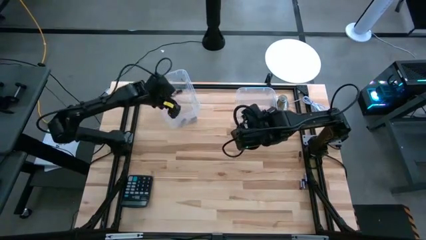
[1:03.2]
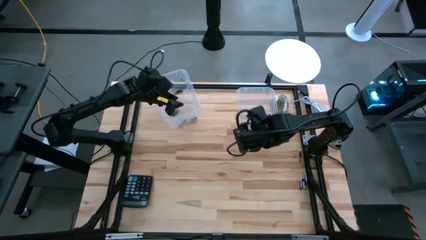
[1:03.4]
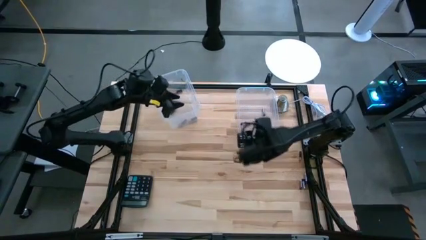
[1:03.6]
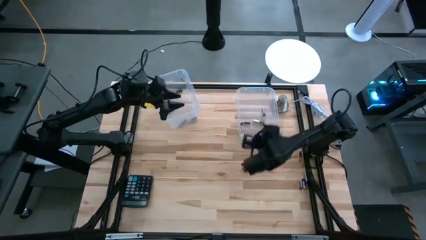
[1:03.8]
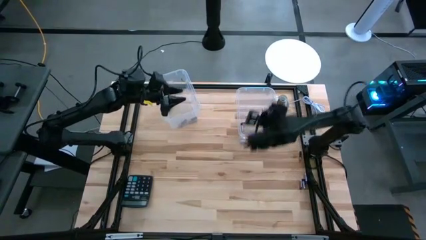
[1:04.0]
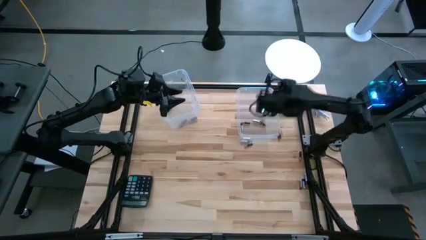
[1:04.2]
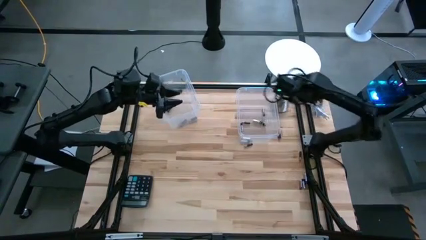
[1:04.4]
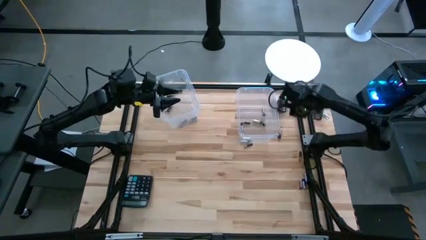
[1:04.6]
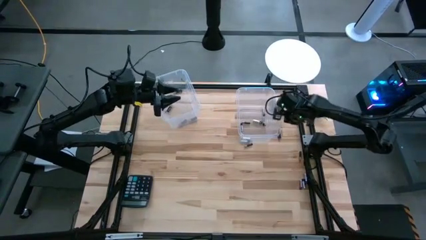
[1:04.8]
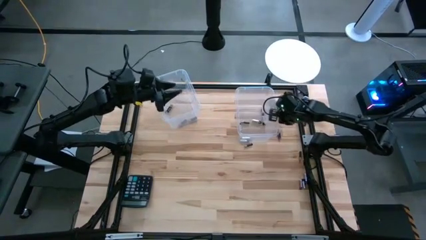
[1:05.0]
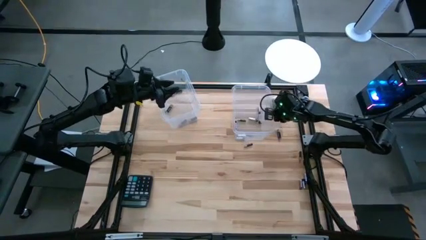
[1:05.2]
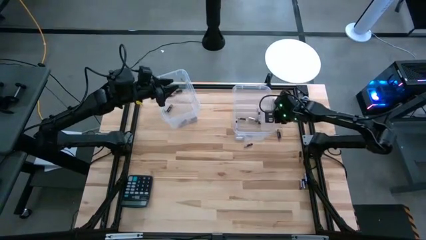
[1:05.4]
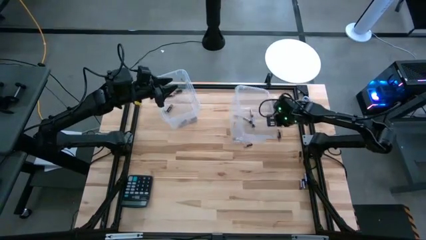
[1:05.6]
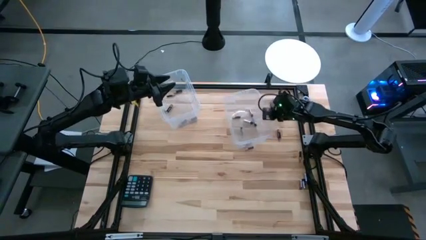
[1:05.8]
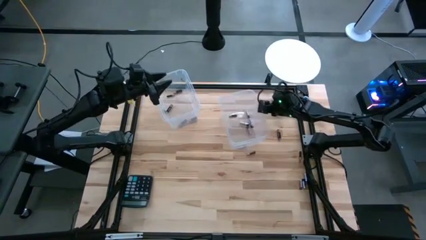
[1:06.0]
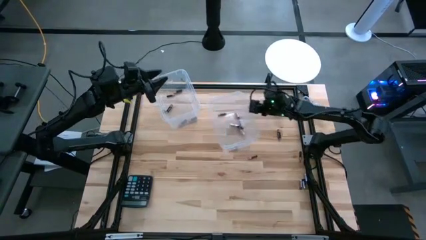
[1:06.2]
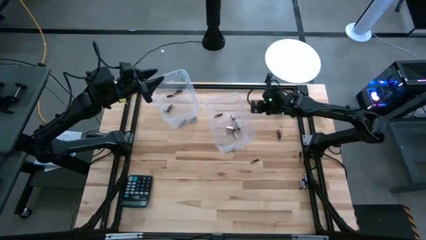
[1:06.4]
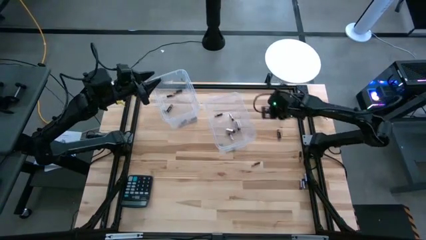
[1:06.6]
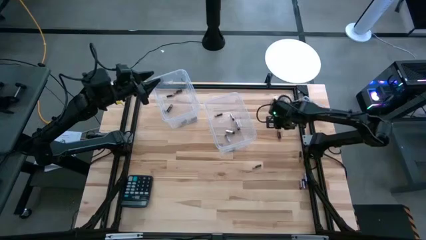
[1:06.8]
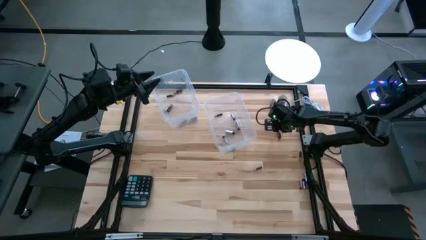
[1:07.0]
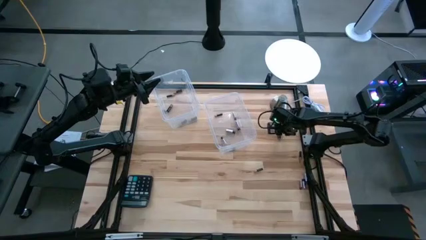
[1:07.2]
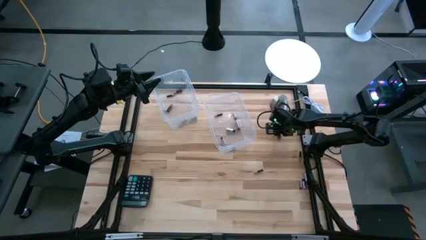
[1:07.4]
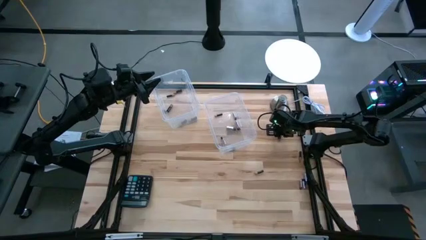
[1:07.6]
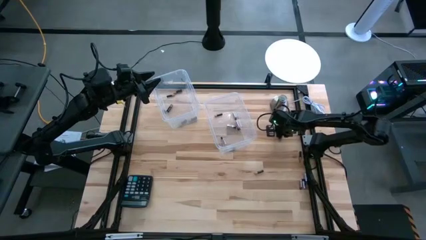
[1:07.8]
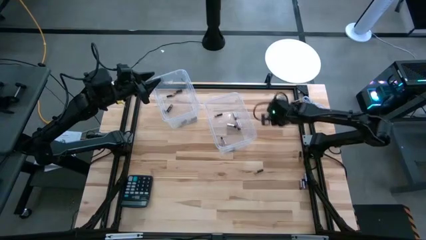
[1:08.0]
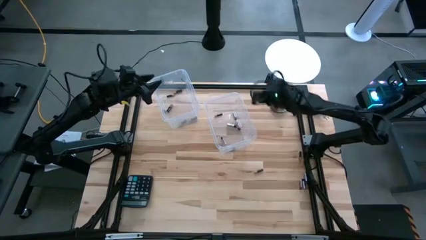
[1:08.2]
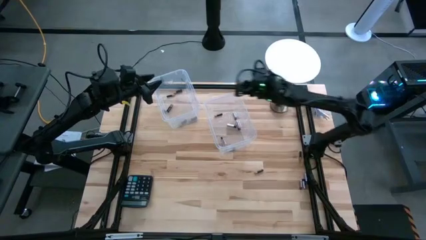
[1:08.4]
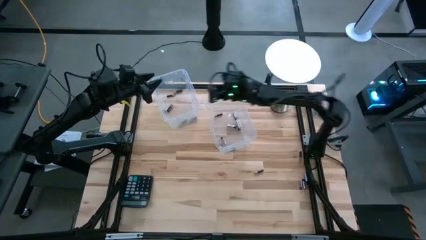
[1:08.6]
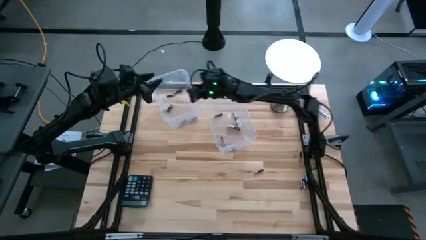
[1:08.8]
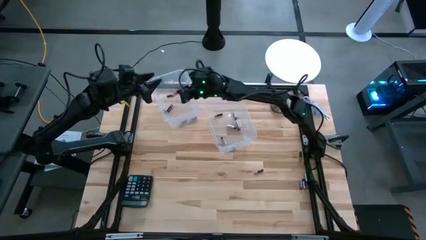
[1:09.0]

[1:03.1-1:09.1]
Task: Sort batteries
Put black battery into the left transparent bin

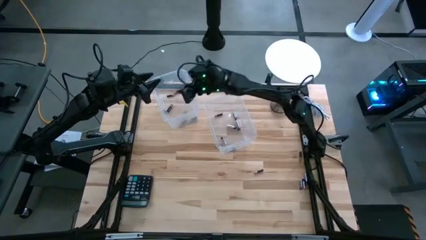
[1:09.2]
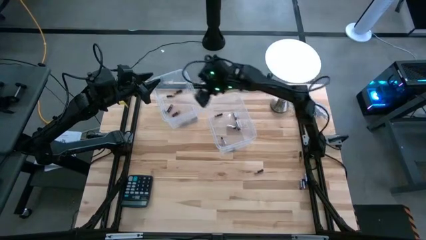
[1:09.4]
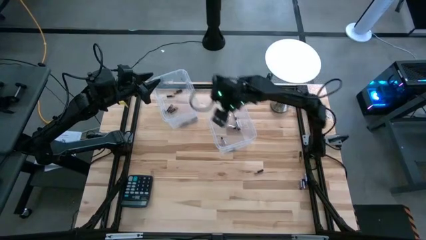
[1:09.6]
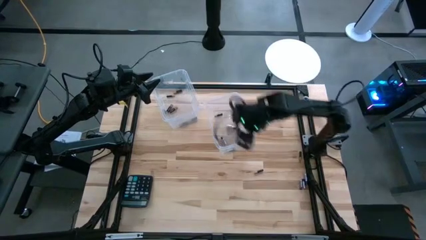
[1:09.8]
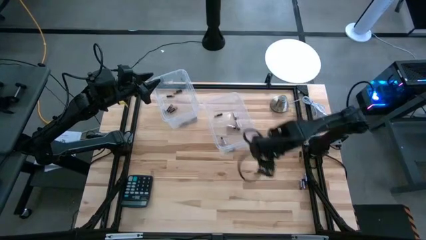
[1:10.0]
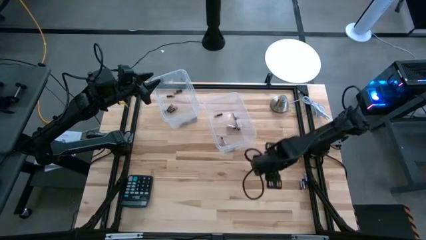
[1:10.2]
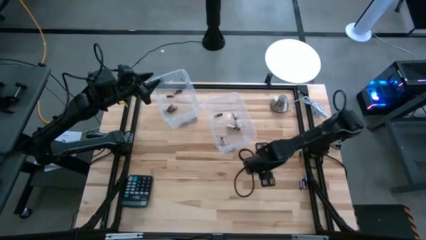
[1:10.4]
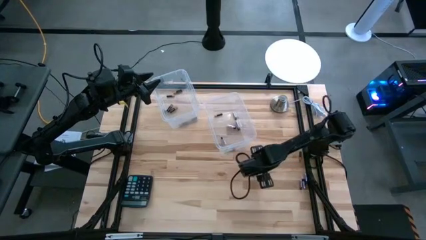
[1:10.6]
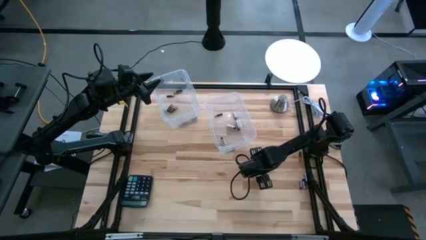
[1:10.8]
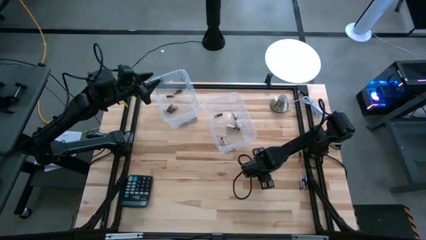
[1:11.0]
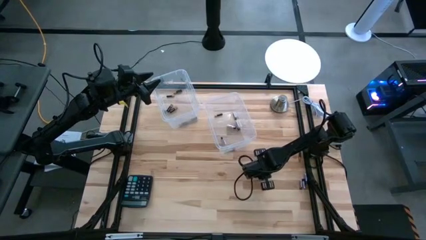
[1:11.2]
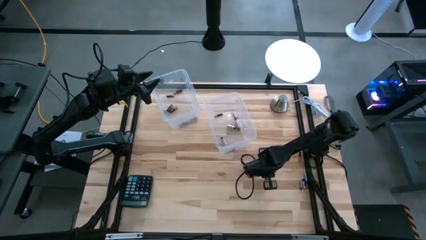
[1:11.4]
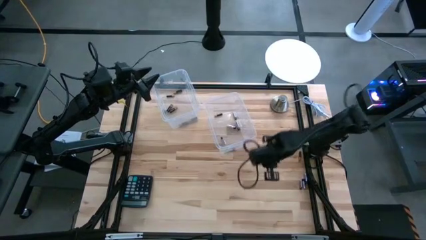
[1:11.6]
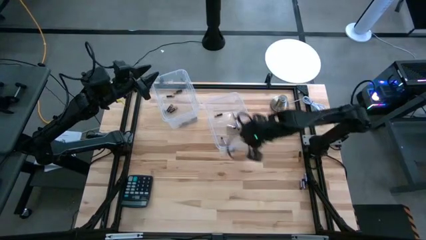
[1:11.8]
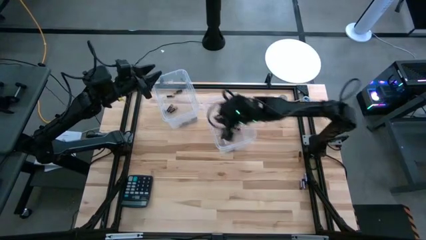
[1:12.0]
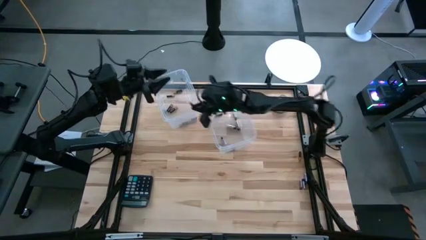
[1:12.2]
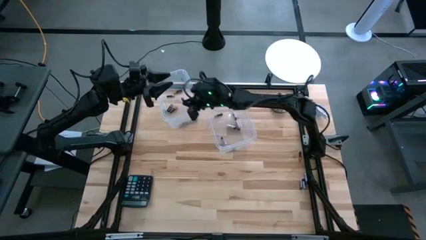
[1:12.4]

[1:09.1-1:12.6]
Put black battery into the left transparent bin

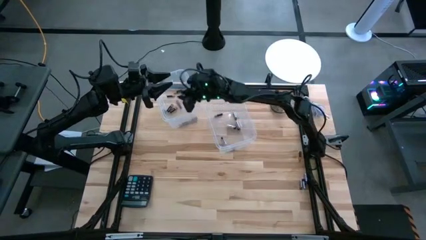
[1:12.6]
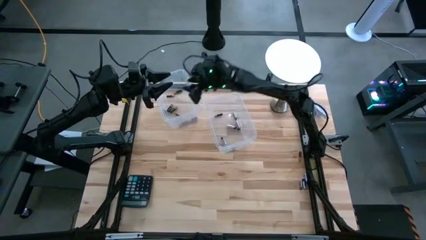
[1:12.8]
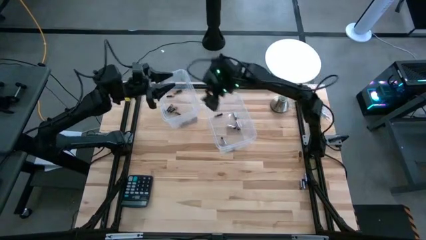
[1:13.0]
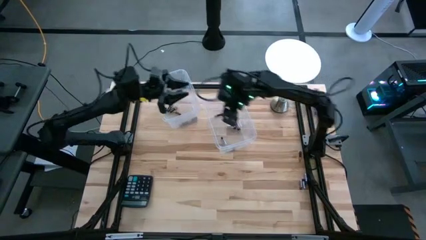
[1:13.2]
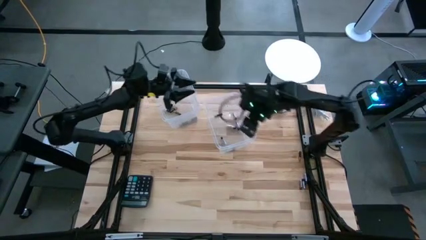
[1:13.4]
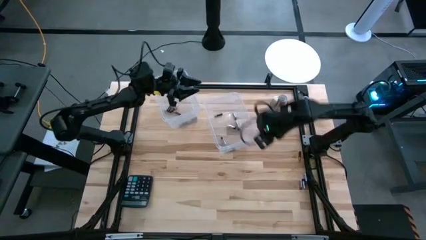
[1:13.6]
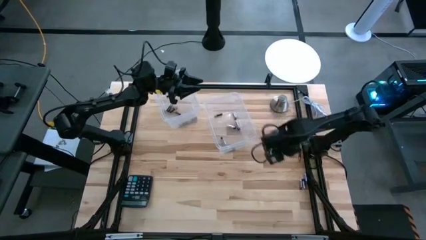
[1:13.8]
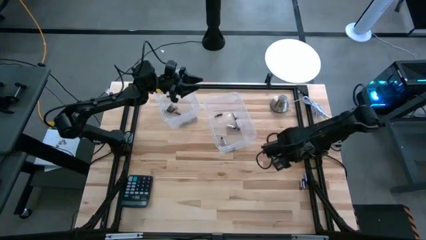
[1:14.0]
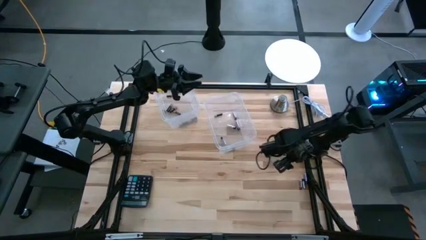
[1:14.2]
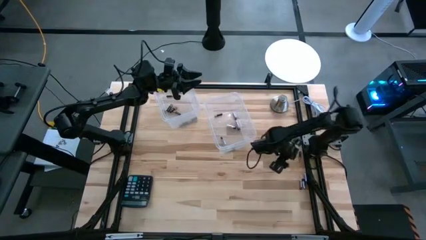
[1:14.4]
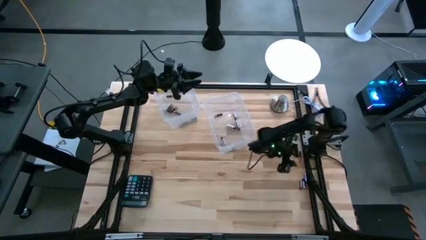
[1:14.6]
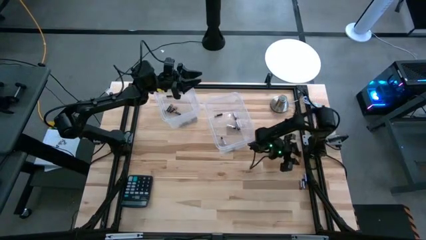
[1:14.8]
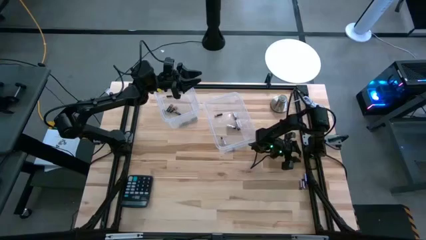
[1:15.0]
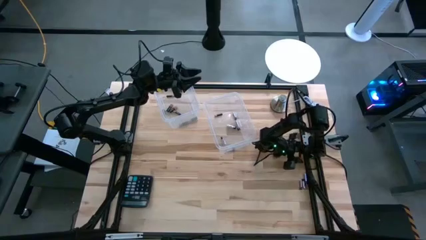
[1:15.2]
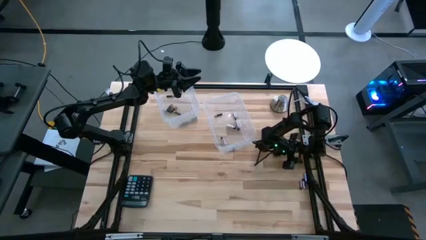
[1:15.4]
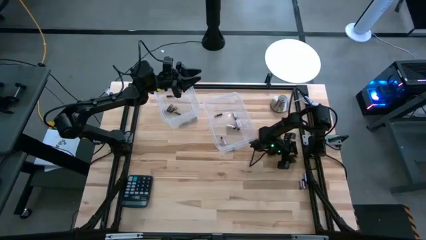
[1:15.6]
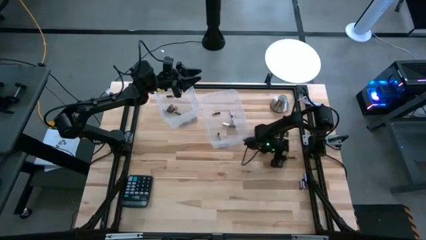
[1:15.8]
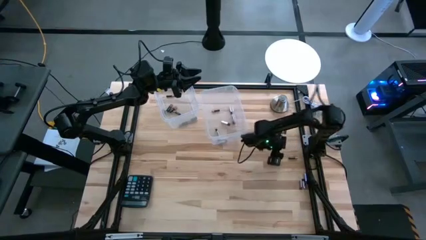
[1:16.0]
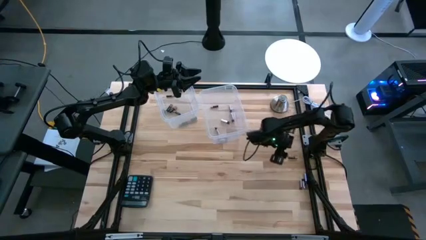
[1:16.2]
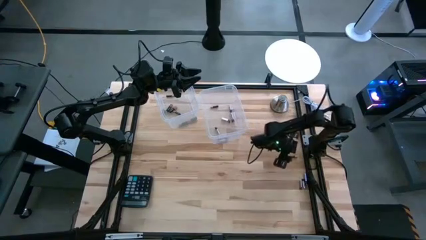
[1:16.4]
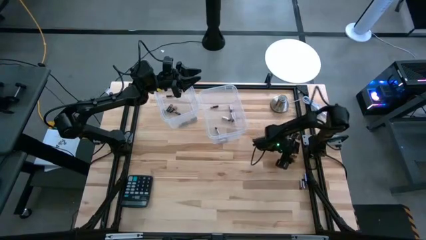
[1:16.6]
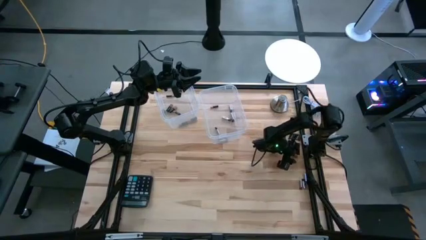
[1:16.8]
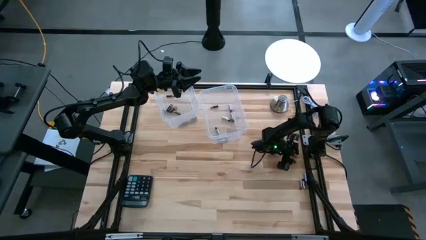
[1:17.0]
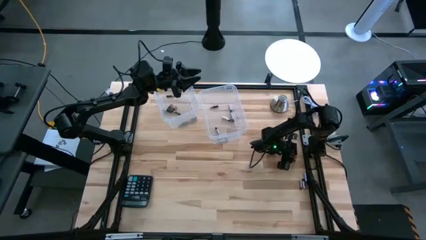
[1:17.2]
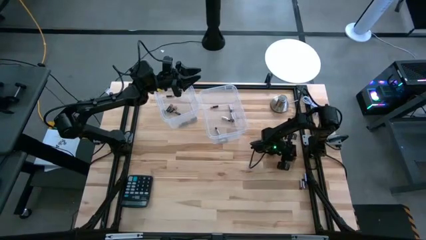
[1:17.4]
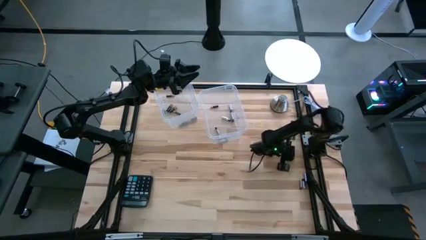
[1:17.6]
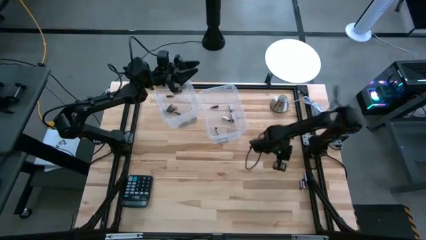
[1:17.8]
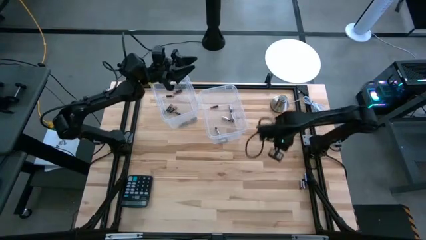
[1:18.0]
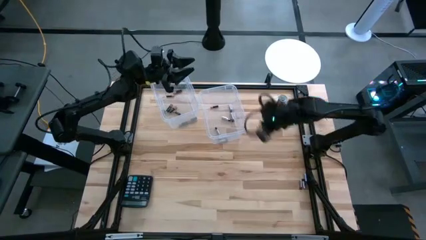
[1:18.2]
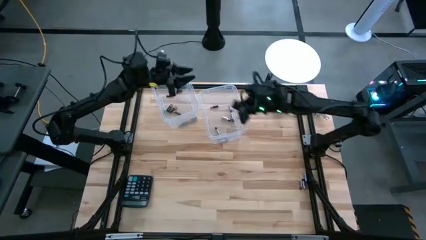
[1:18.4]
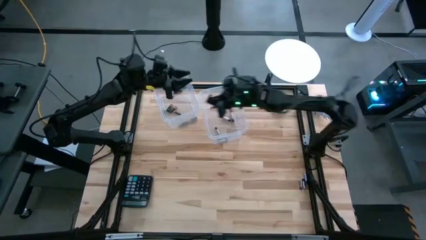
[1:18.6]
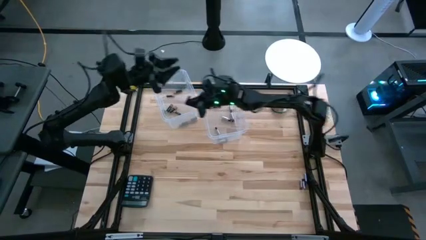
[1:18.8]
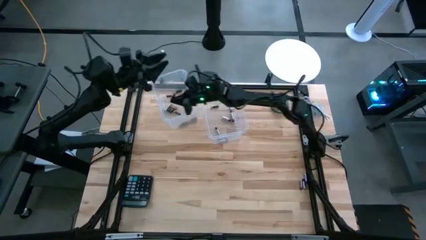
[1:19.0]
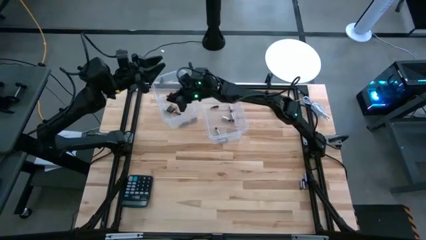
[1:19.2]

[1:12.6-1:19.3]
Put black battery into the left transparent bin
